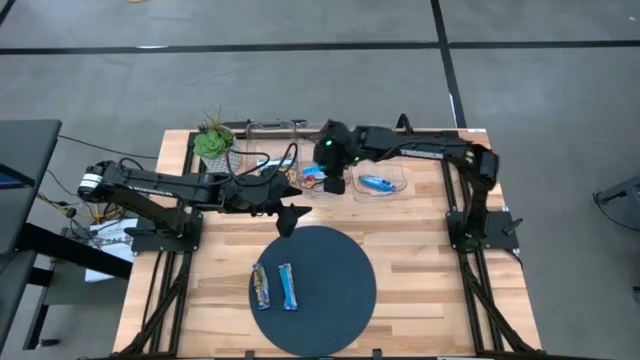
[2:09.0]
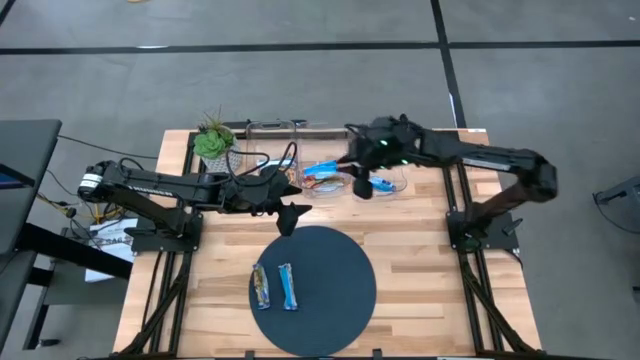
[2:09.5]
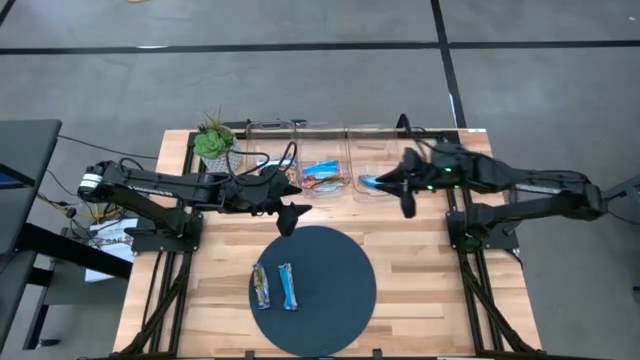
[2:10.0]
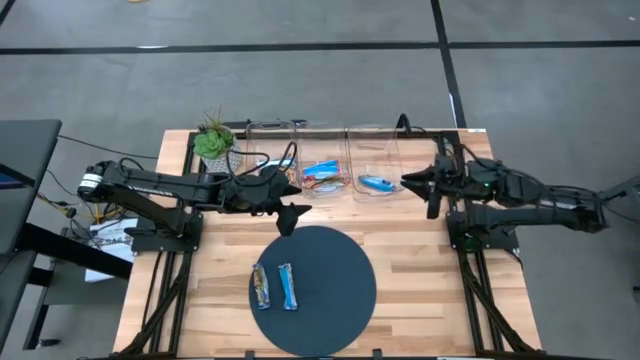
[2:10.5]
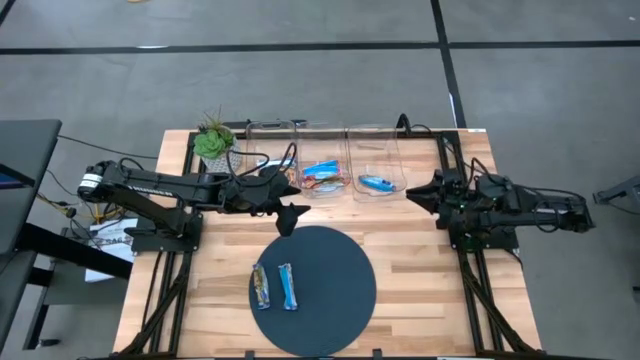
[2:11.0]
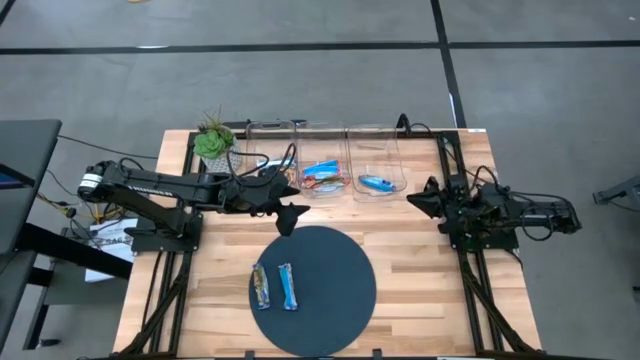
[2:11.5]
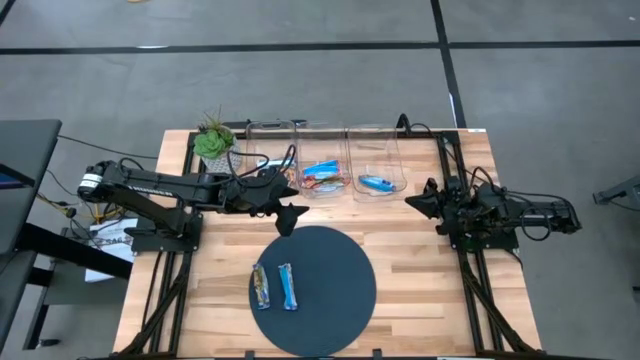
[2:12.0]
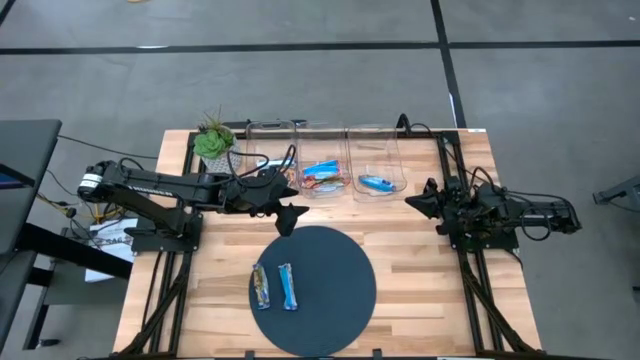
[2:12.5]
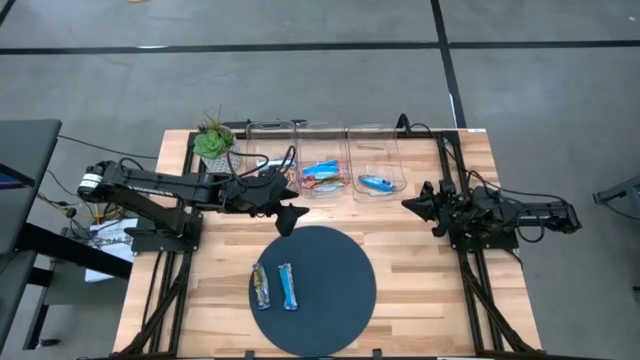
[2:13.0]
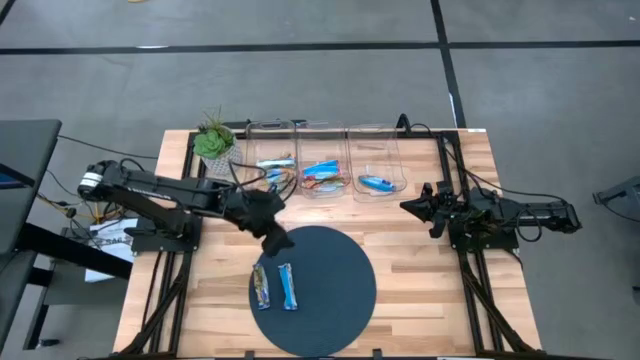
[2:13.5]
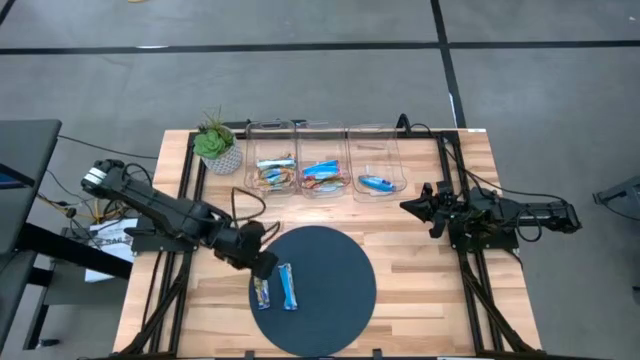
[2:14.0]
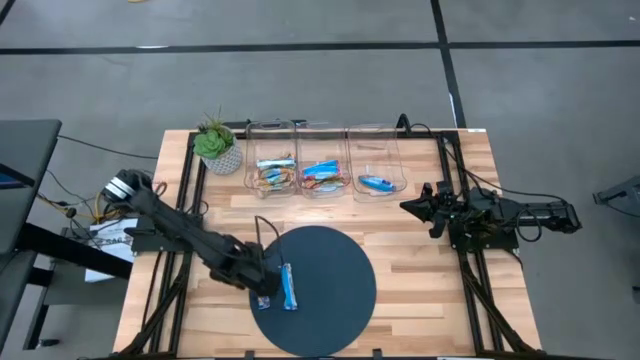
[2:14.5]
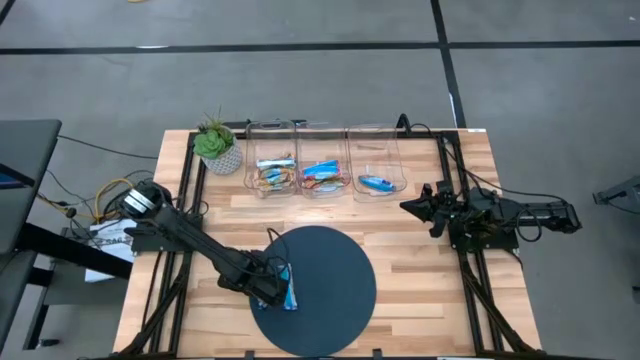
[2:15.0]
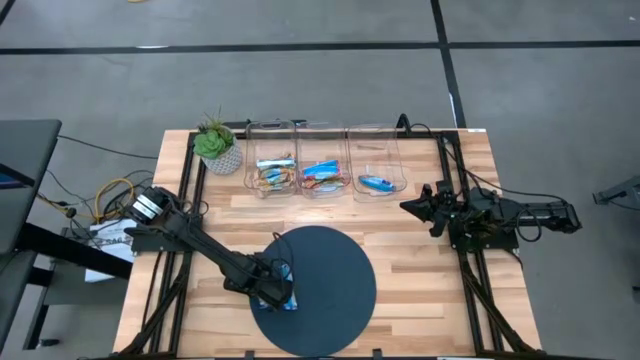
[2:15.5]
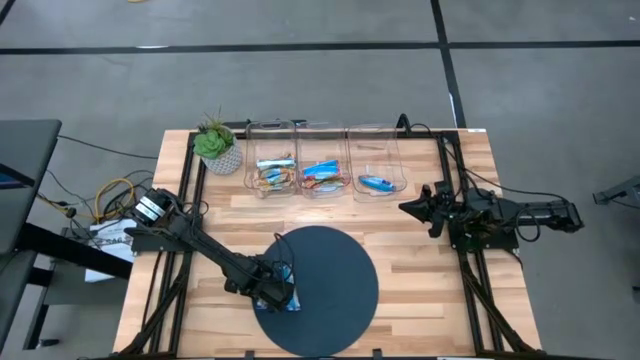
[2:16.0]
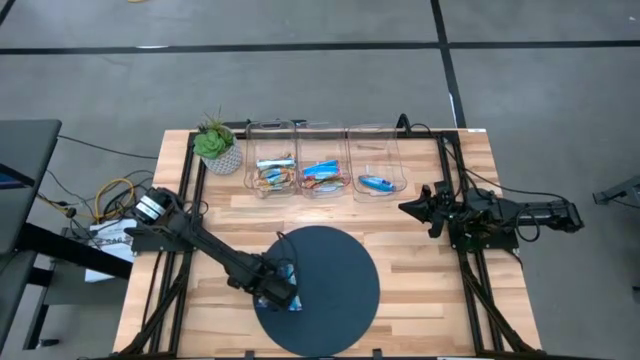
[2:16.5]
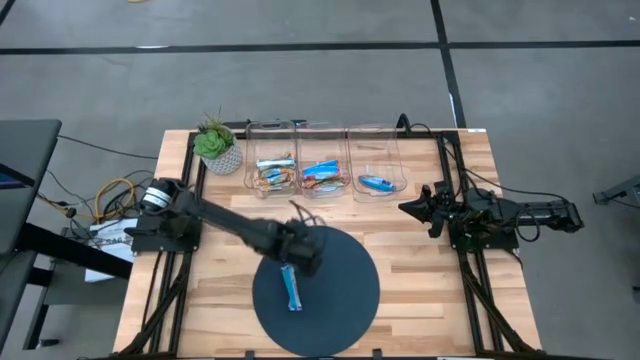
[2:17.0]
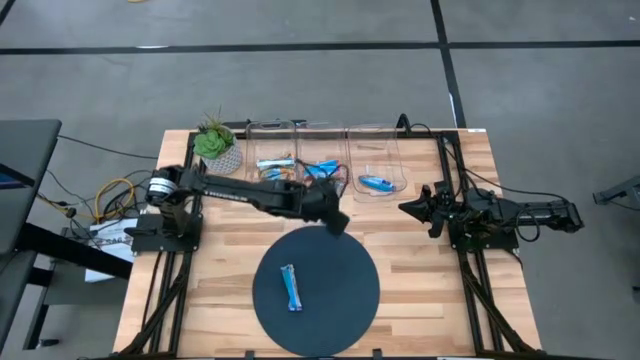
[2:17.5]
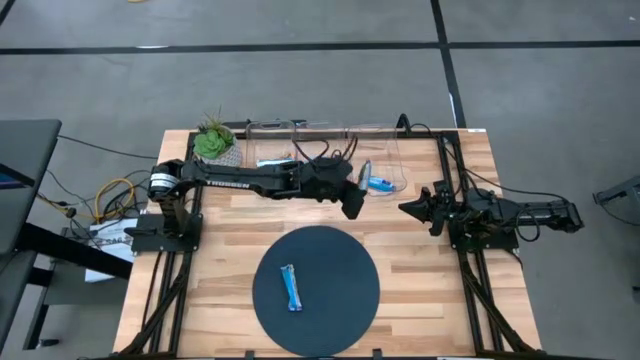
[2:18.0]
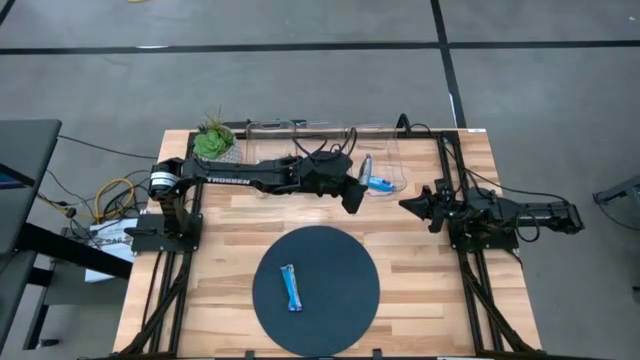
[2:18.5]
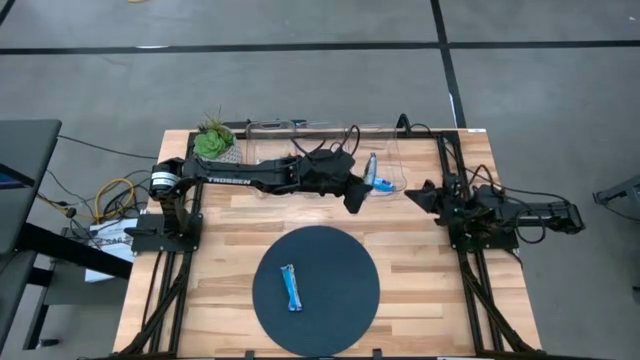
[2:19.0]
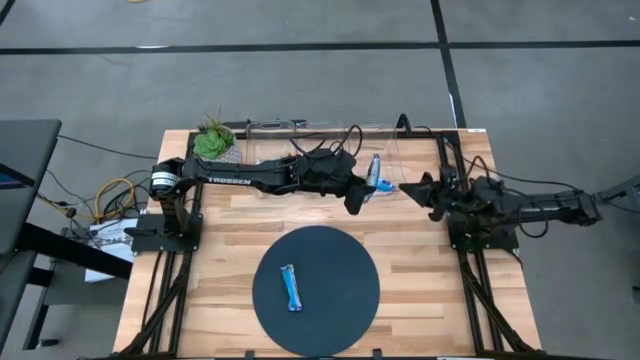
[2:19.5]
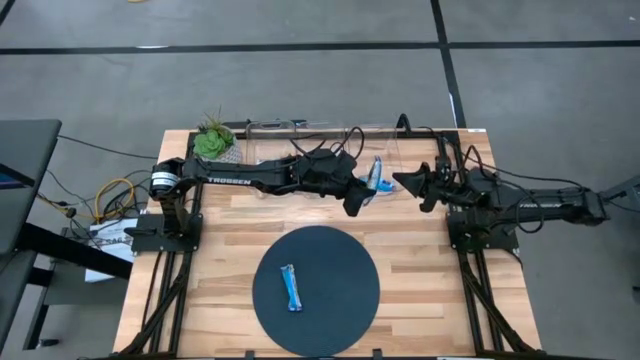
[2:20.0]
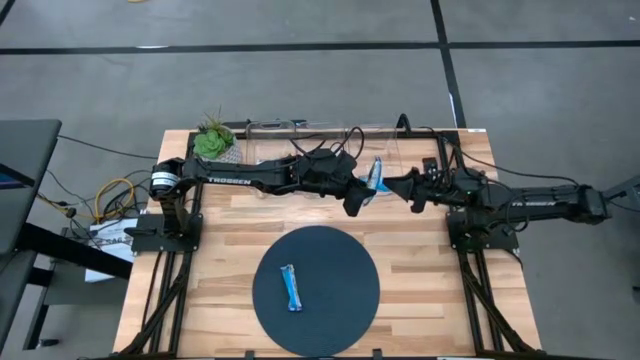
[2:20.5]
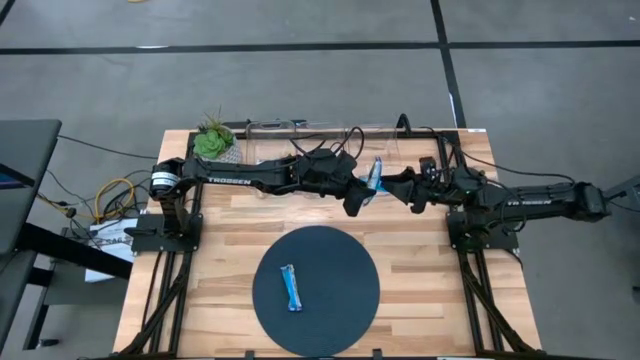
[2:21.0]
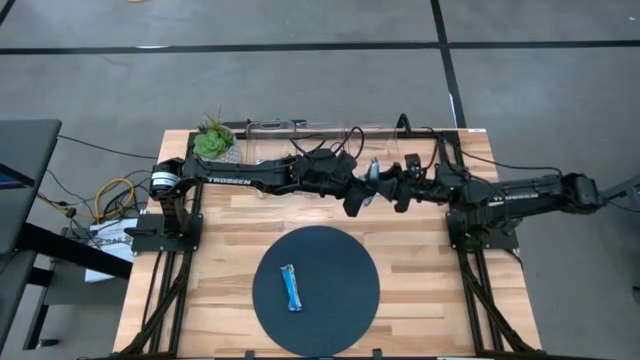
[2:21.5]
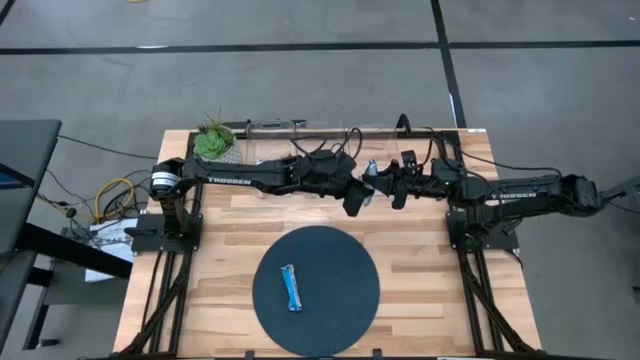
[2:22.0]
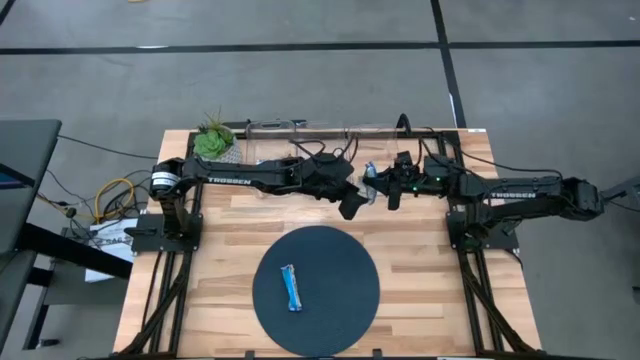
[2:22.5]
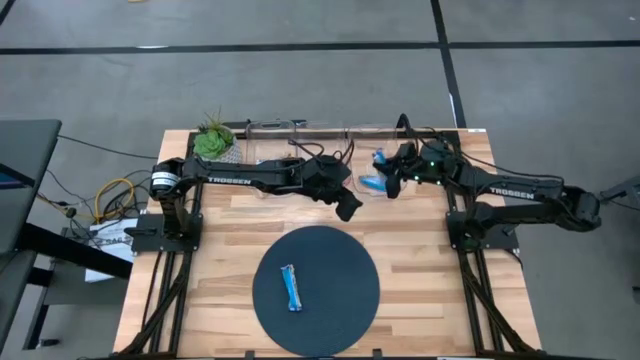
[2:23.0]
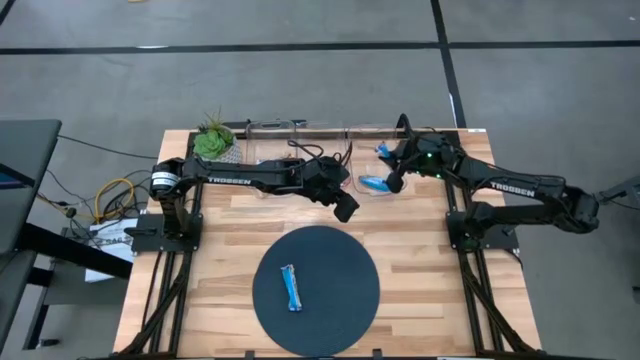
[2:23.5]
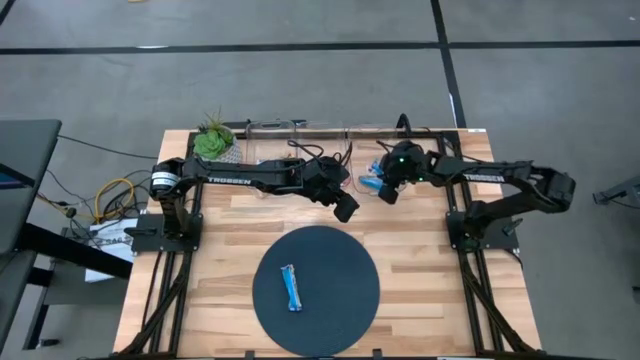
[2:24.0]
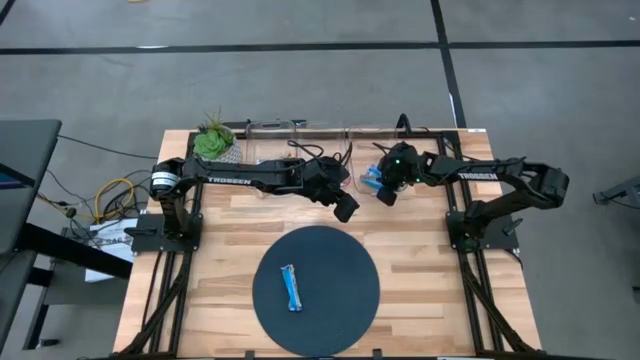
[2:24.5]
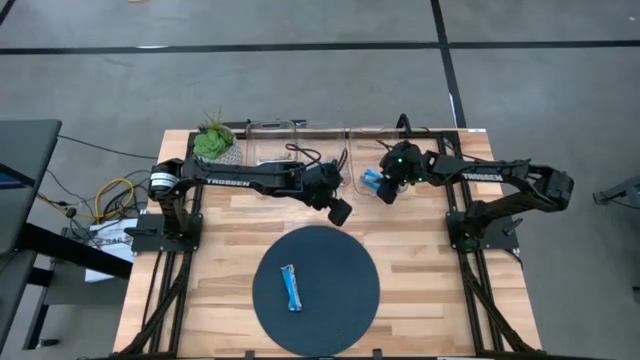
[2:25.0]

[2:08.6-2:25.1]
Task: Pick and place Granola Bars by type
Put the blue bar into the right transparent bin

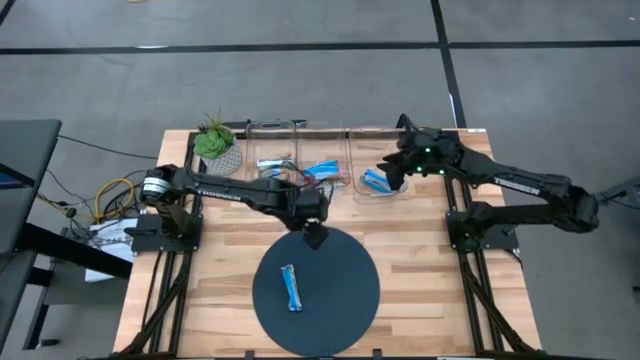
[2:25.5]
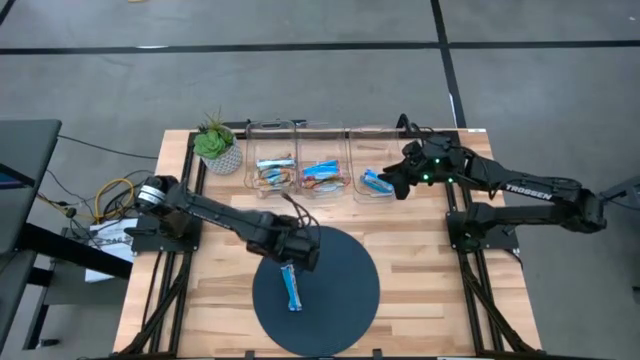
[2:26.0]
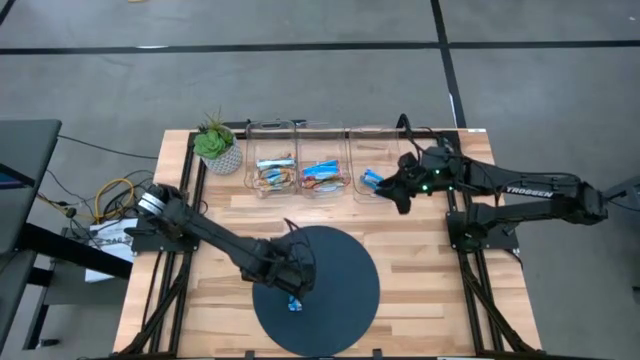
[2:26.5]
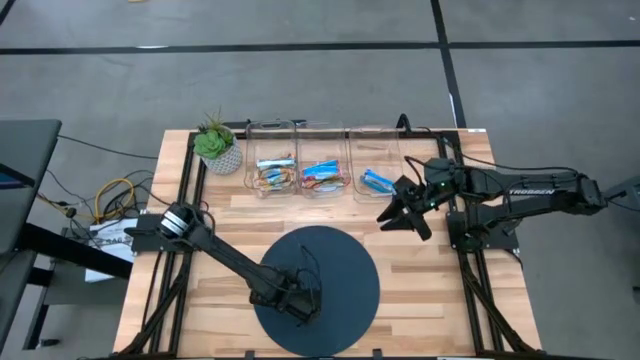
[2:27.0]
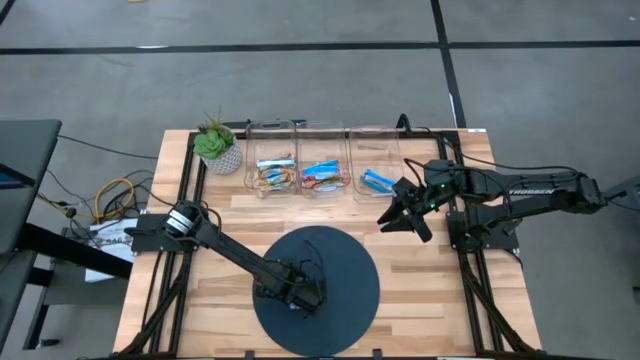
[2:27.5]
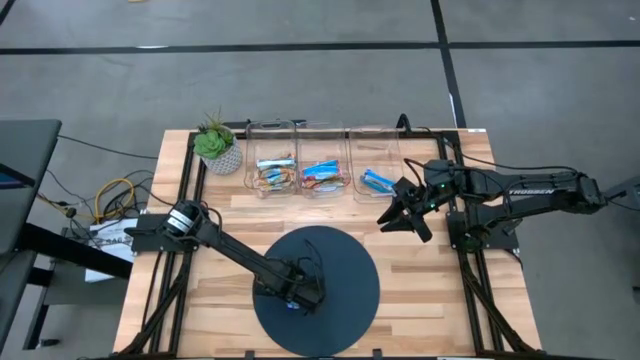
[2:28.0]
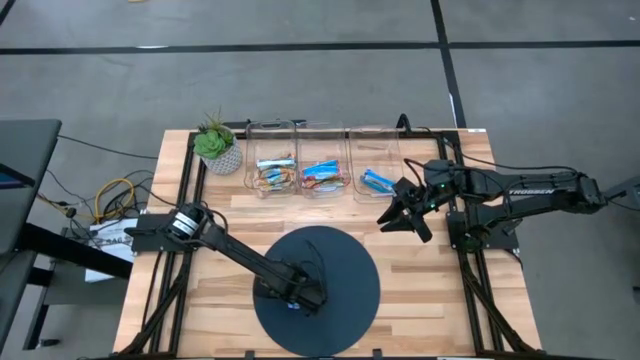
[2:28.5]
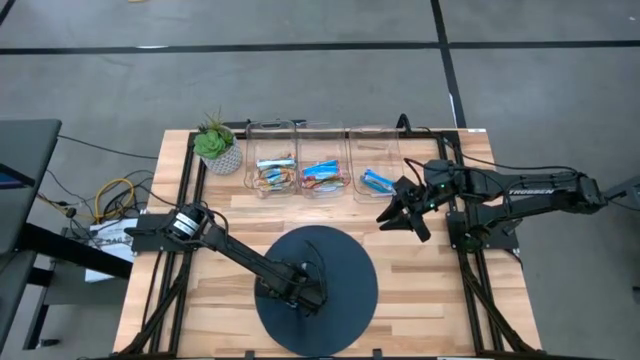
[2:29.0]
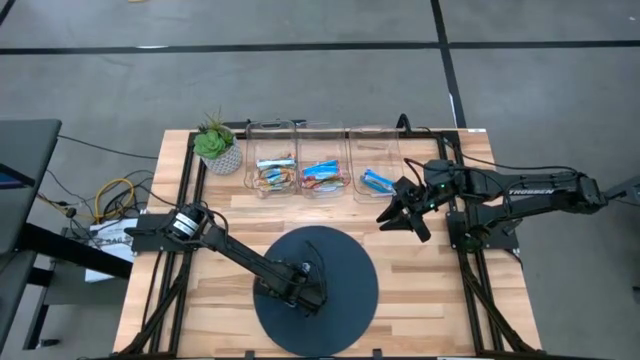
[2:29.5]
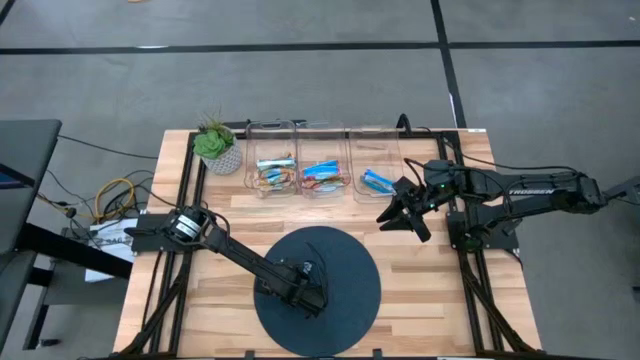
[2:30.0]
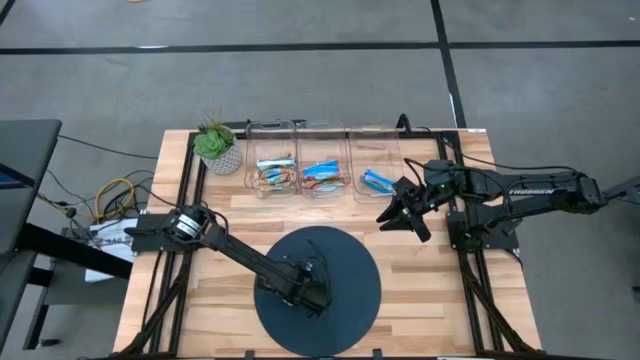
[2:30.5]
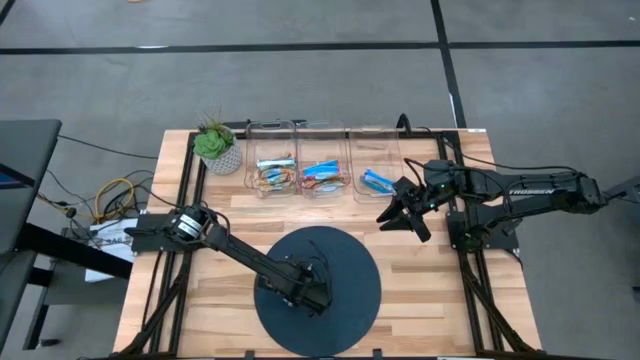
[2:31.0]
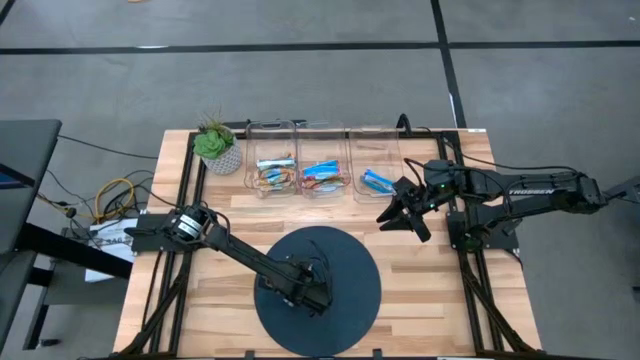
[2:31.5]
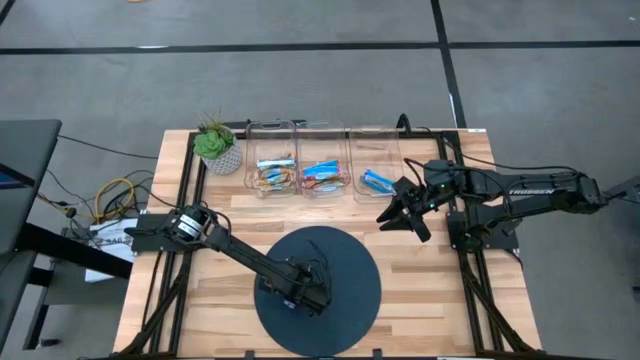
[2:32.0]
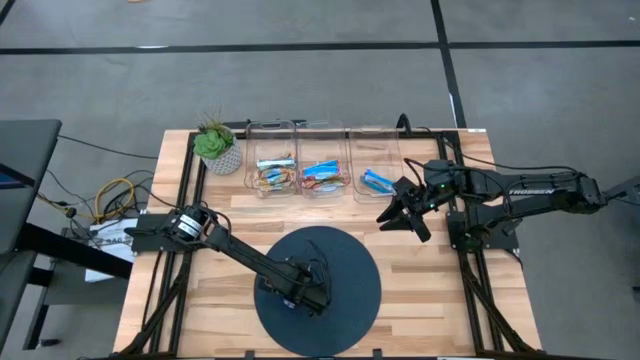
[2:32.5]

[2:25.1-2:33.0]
Put the blue bar into the right transparent bin
